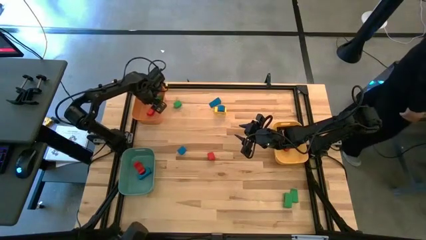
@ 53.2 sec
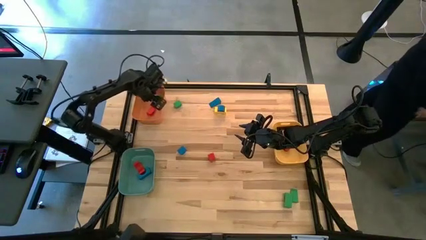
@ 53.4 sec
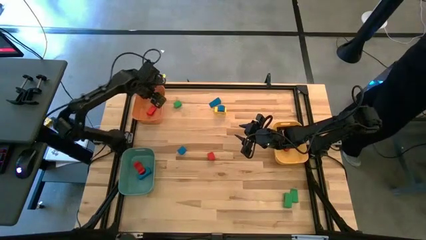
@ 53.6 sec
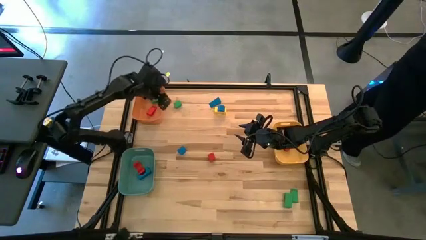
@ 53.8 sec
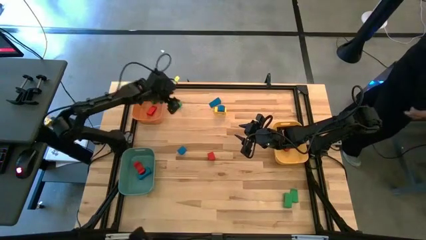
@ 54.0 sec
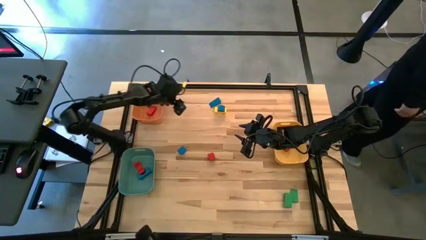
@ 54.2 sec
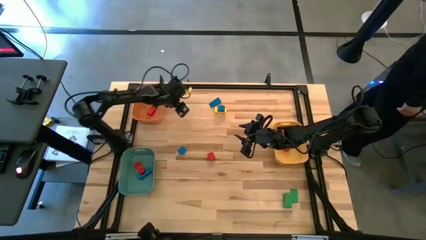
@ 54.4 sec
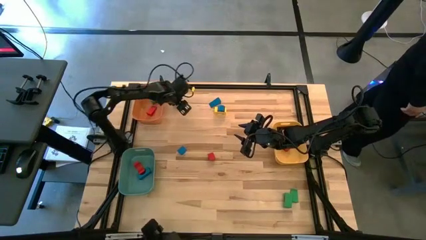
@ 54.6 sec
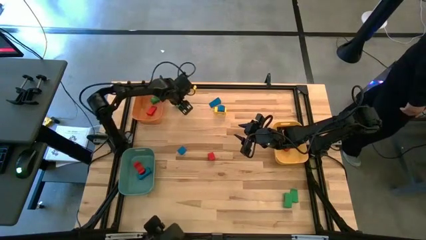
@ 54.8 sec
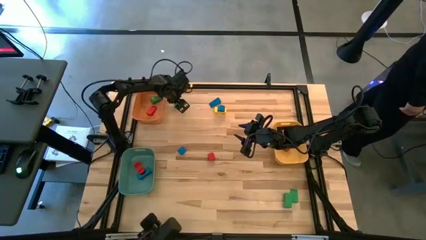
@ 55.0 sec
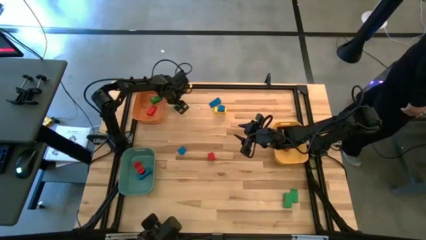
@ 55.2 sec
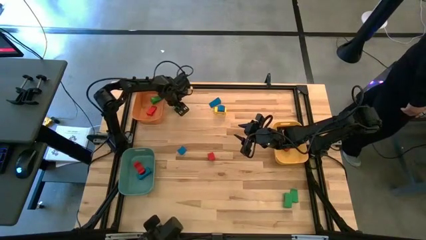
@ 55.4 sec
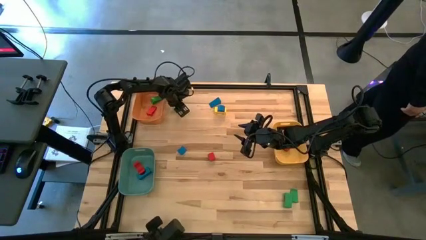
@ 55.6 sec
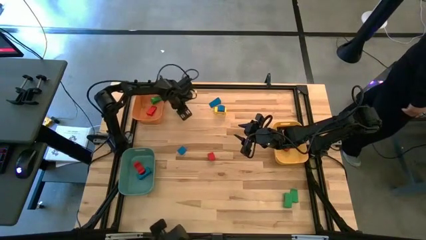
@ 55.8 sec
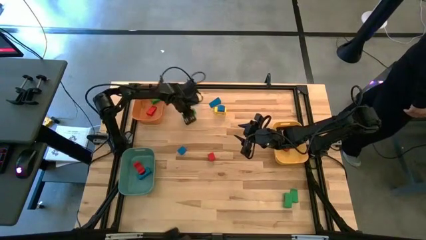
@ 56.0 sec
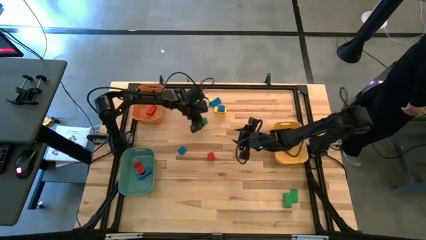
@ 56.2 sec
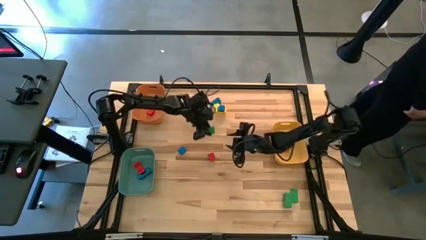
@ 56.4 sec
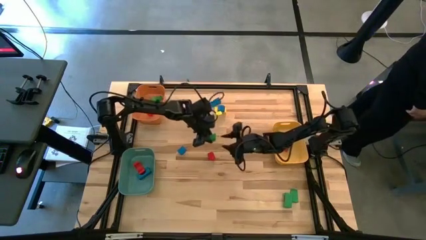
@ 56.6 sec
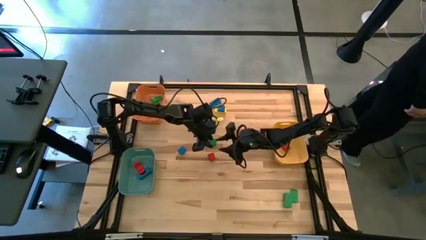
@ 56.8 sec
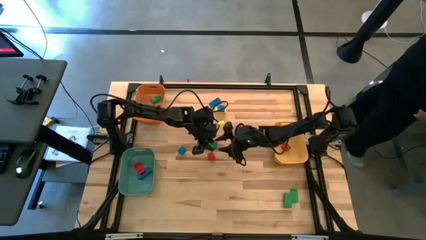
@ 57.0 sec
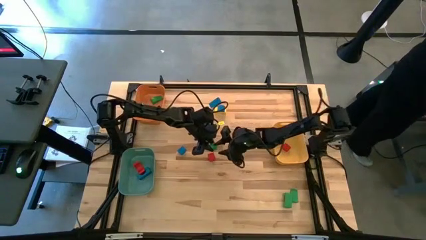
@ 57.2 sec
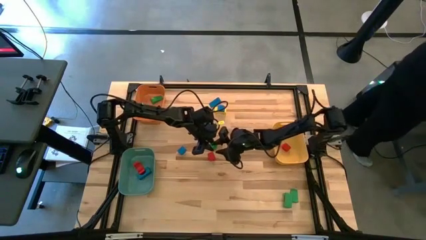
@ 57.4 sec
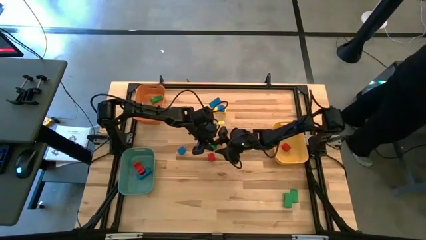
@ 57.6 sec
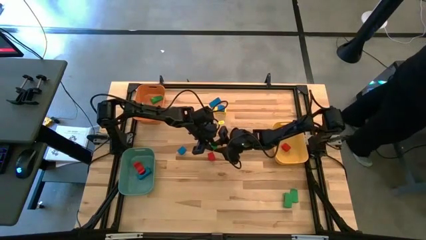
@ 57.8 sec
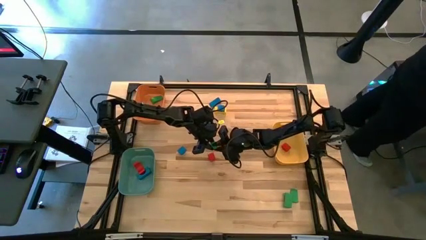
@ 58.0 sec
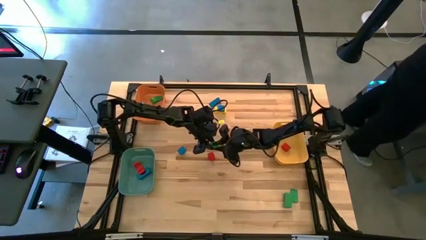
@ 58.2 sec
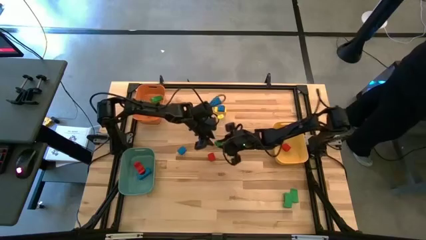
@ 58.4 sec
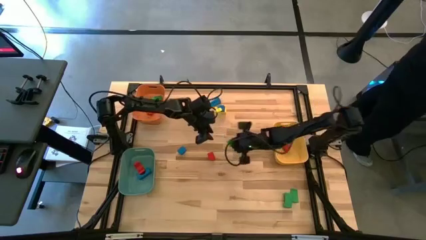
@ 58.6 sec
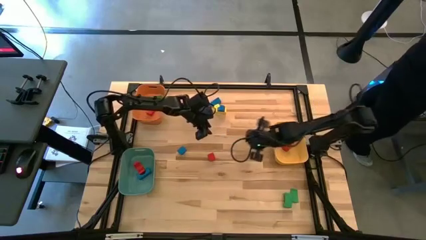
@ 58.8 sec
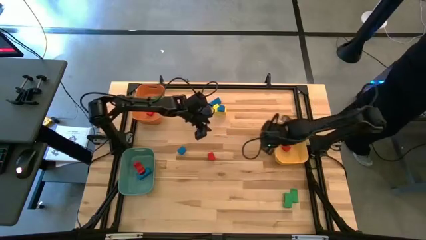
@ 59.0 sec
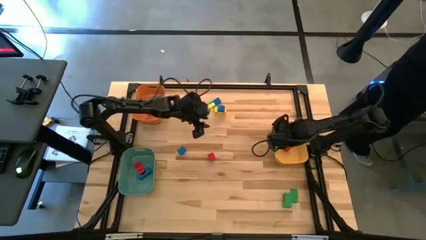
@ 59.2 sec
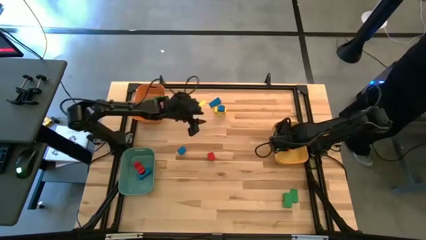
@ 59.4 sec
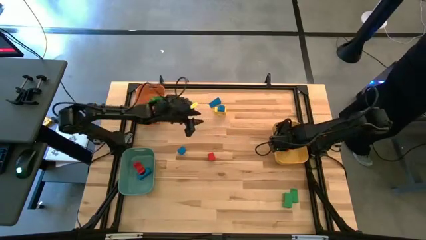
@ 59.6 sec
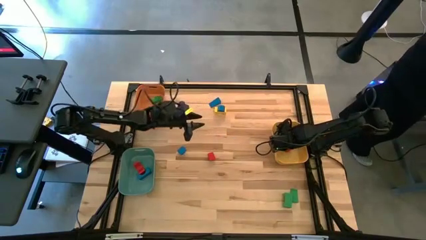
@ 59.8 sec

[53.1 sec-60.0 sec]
Task: Sort blocks by size
Put the green half-circle block into the yellow bin

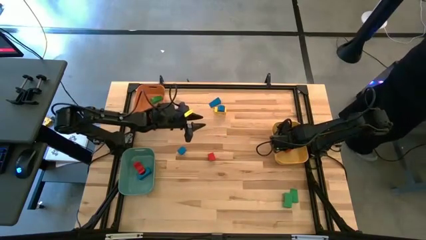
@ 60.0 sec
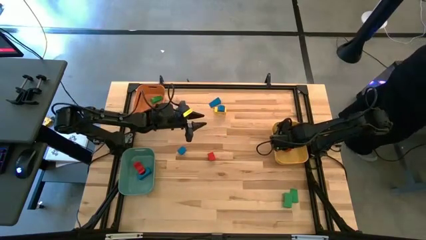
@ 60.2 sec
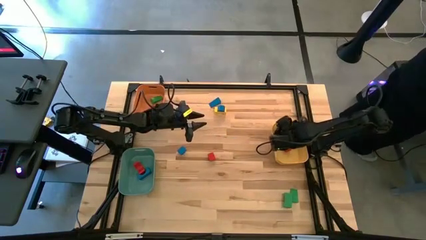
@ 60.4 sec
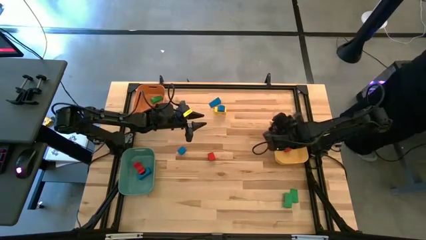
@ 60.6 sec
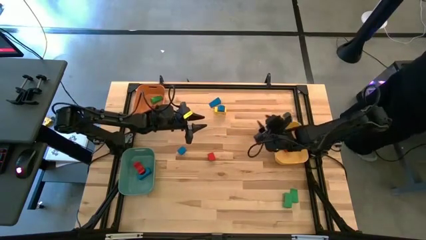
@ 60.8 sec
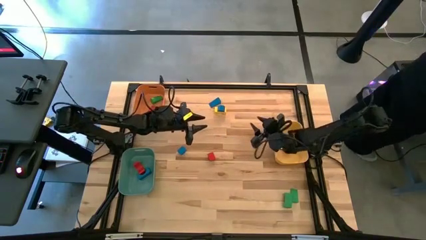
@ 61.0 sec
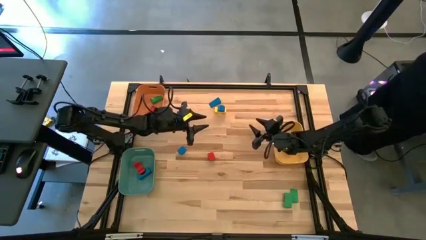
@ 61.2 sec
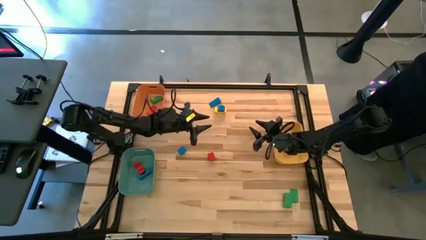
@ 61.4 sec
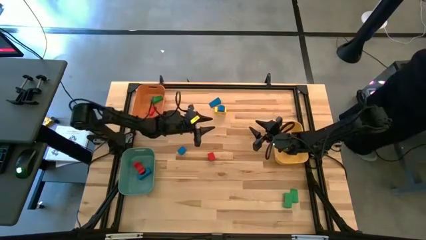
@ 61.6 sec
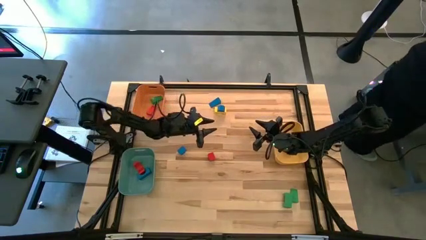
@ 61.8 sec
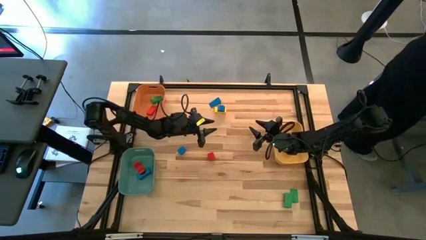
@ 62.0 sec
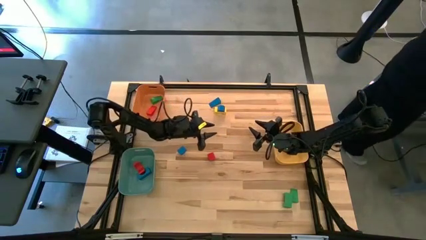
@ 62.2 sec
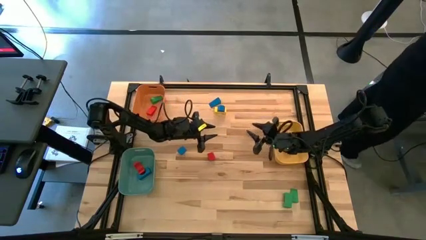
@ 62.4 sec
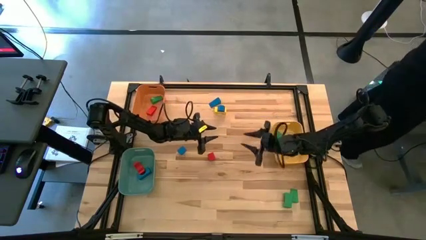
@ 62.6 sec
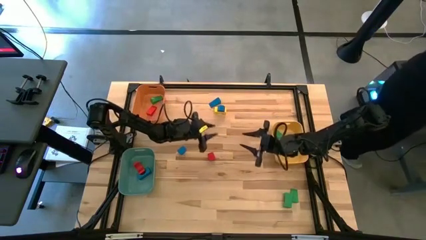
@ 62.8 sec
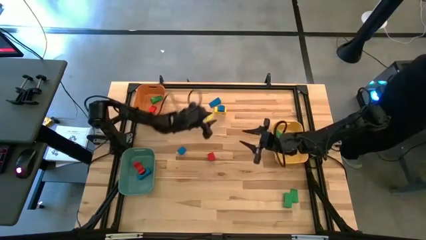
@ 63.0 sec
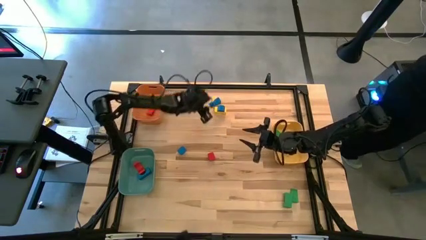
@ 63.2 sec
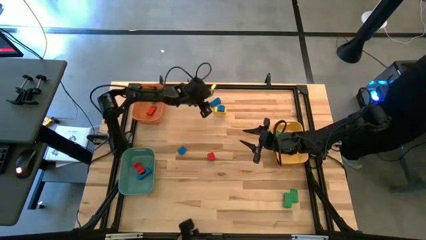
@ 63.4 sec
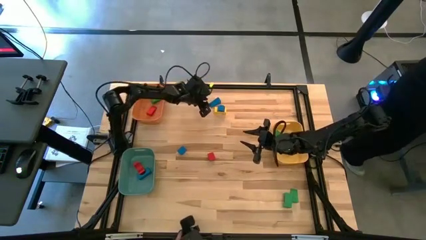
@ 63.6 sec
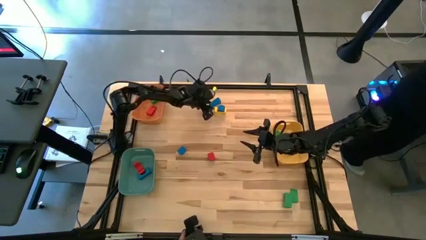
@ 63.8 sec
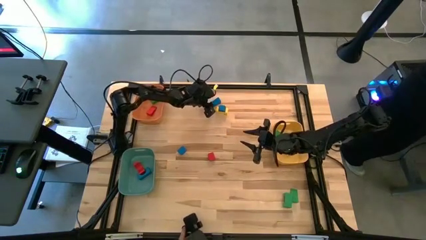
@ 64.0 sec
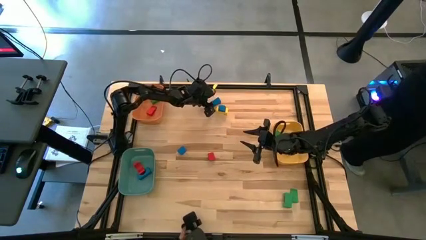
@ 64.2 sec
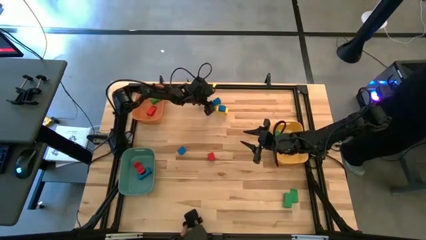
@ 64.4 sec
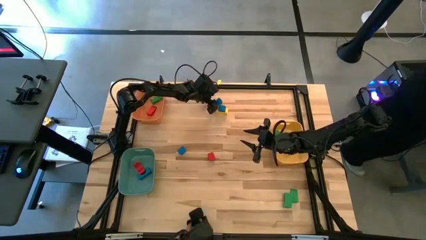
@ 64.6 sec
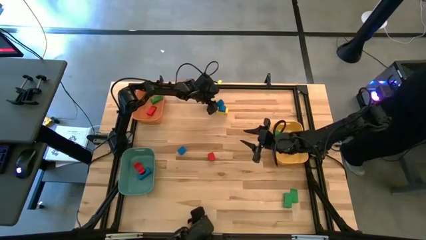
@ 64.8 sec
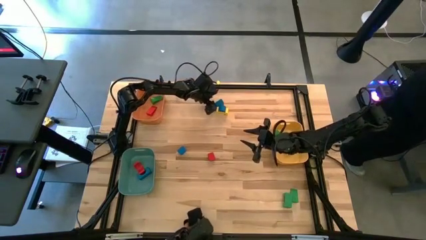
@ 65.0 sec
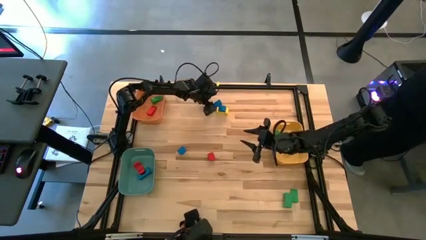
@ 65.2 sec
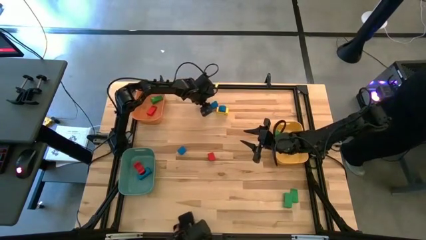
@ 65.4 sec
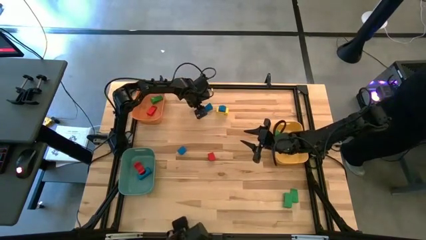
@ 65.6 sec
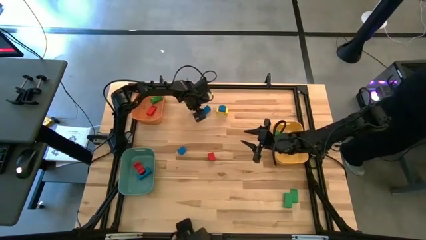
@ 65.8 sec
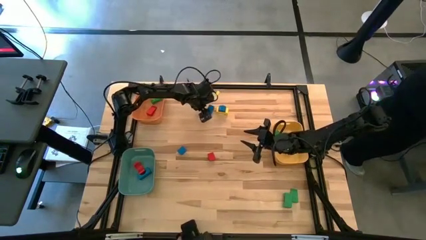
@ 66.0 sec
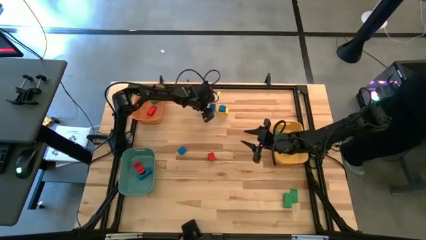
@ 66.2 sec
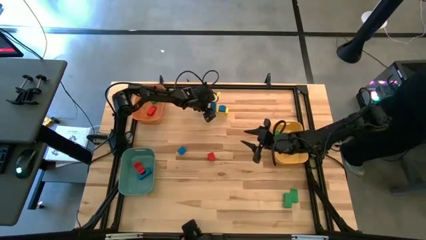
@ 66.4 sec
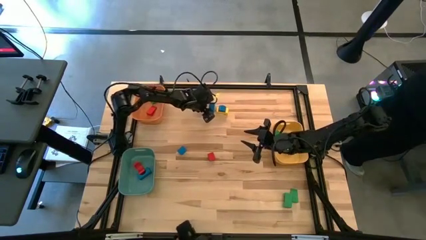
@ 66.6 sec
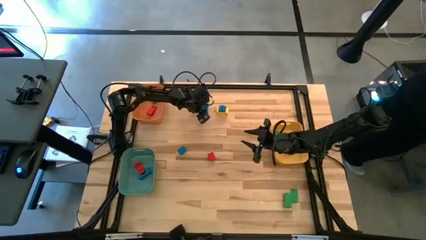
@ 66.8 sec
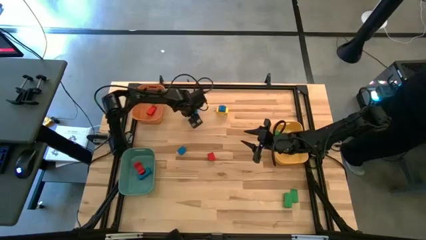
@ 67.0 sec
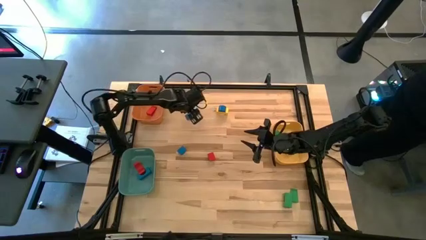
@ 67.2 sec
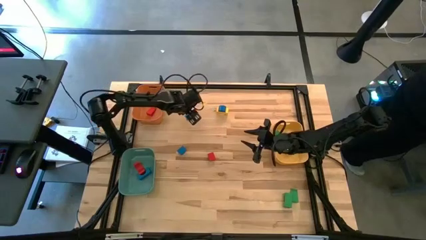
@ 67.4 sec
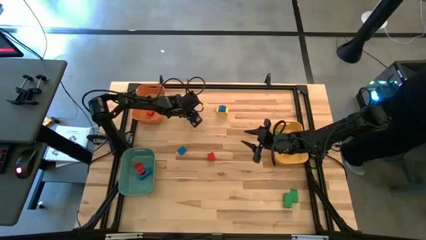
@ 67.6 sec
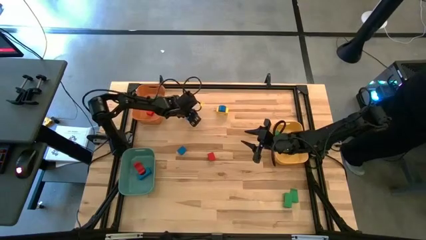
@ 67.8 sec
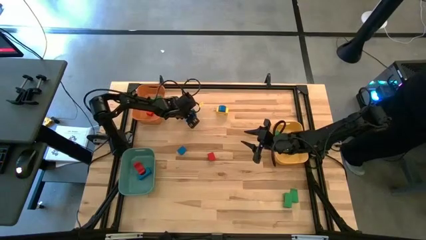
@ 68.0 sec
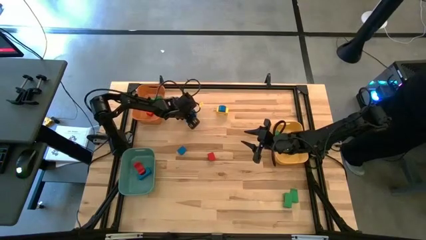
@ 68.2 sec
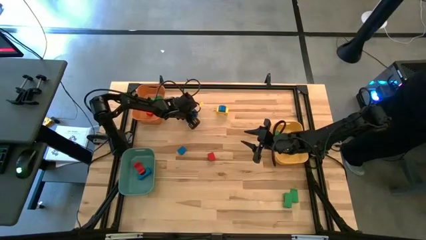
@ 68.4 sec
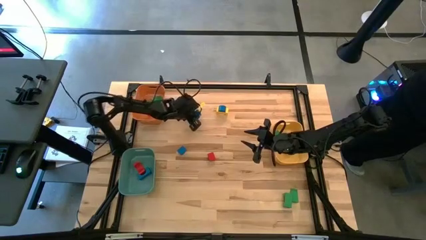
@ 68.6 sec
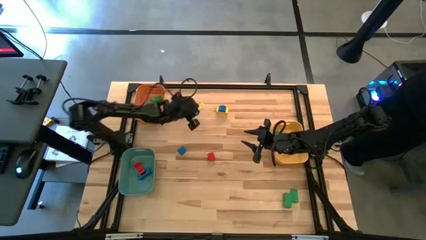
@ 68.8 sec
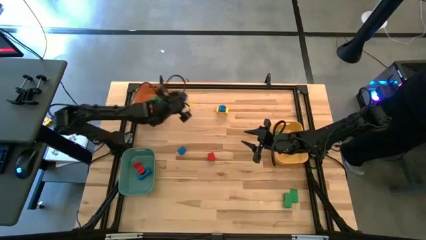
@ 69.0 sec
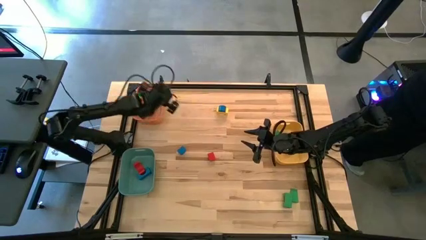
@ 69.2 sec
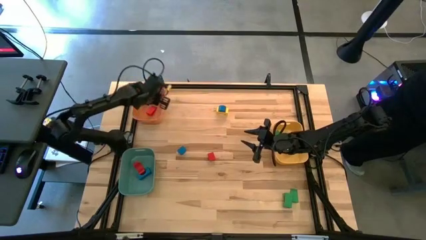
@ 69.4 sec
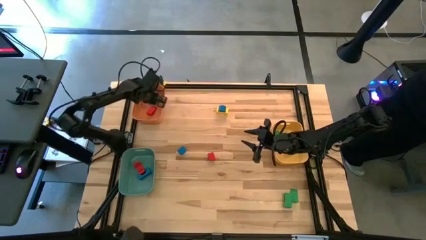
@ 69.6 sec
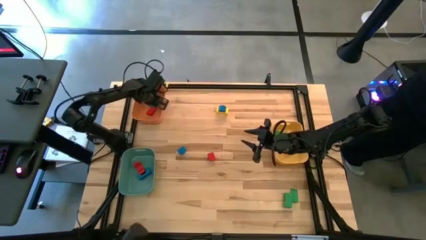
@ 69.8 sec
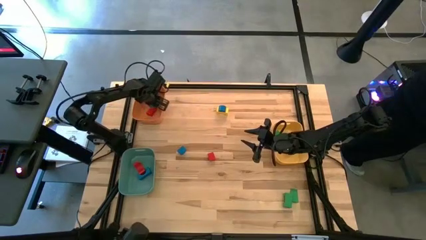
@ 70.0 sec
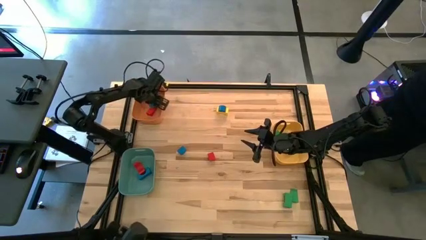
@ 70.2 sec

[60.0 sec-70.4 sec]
Put the blue triangle block into the orange bin
